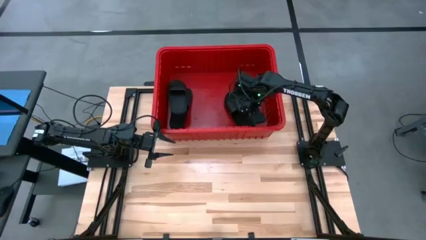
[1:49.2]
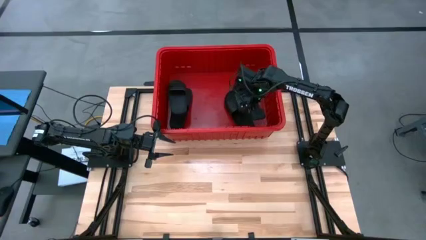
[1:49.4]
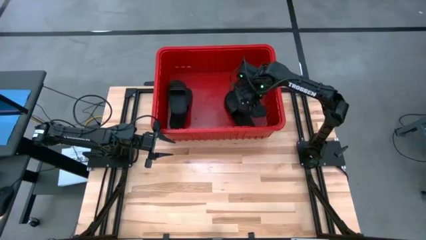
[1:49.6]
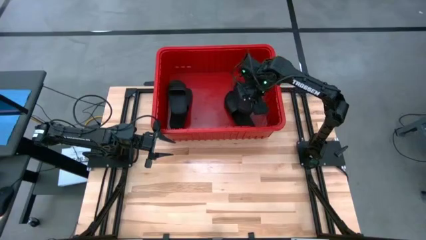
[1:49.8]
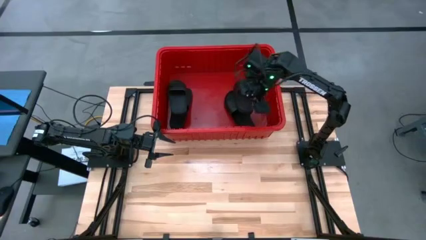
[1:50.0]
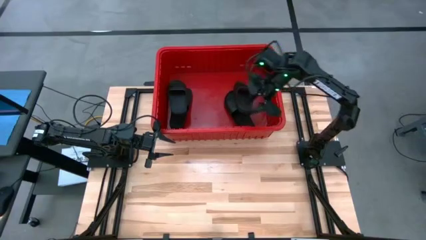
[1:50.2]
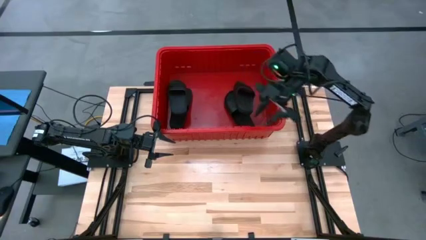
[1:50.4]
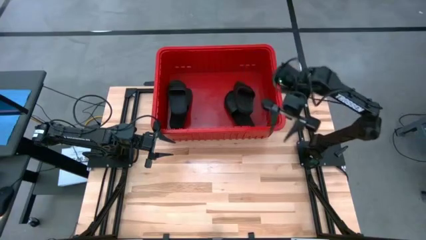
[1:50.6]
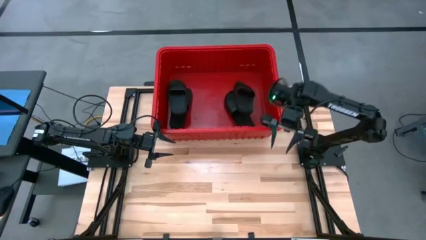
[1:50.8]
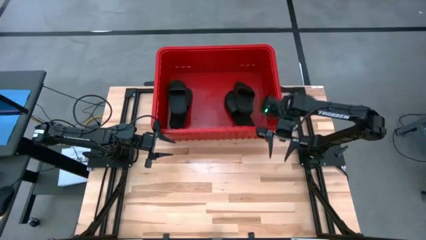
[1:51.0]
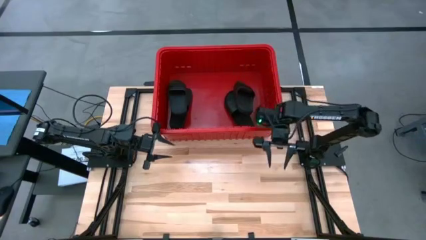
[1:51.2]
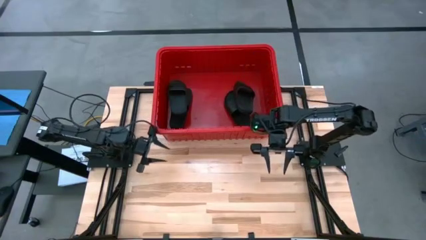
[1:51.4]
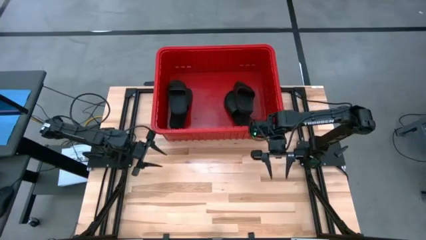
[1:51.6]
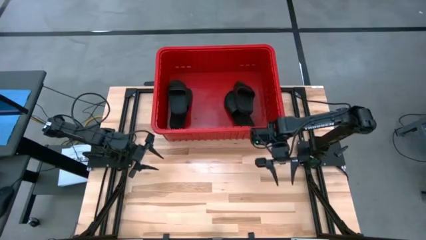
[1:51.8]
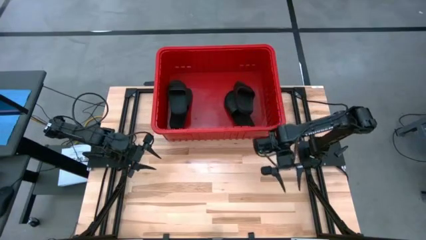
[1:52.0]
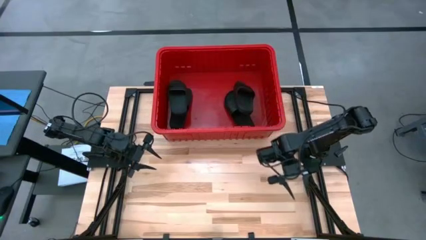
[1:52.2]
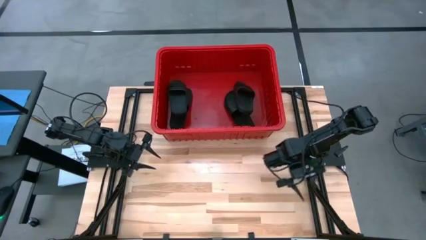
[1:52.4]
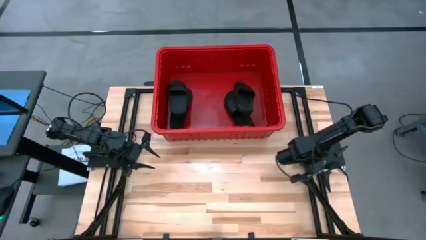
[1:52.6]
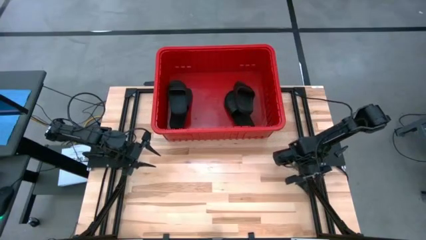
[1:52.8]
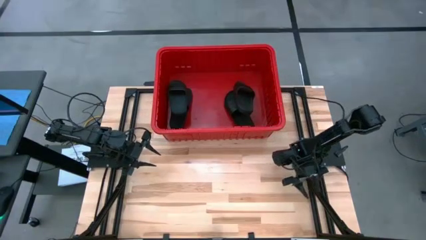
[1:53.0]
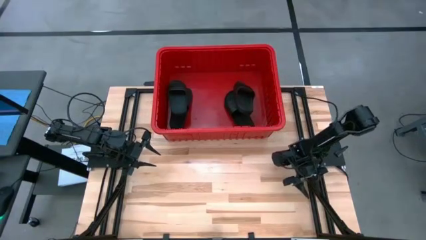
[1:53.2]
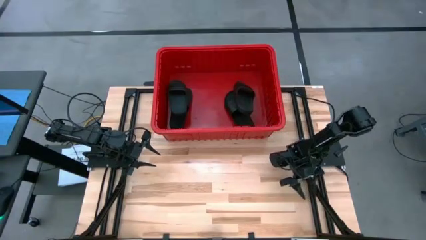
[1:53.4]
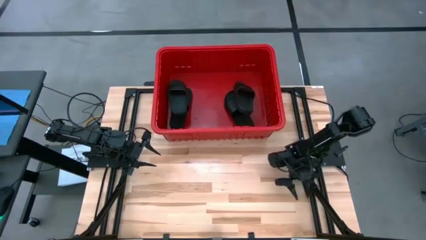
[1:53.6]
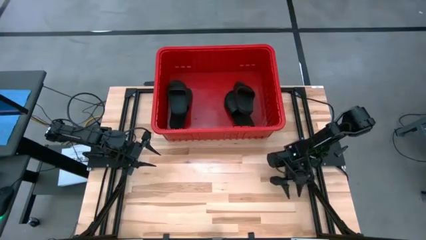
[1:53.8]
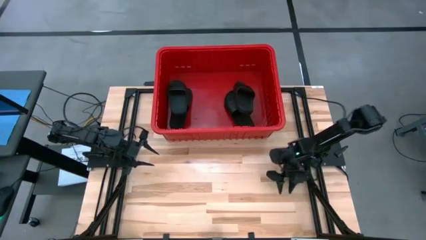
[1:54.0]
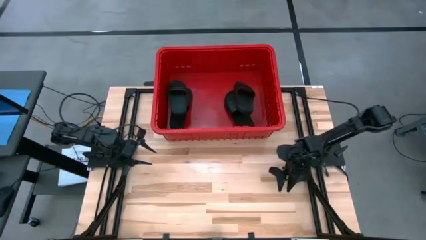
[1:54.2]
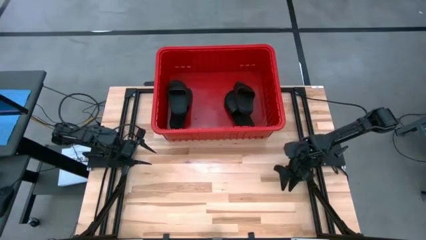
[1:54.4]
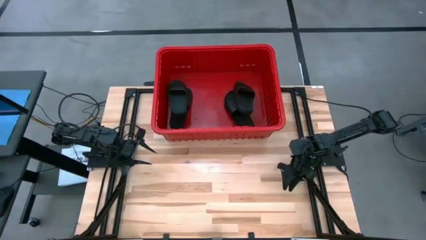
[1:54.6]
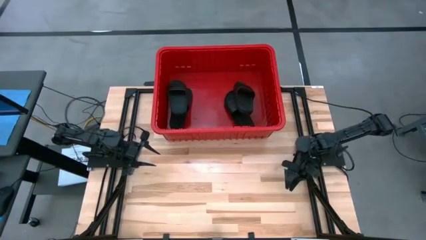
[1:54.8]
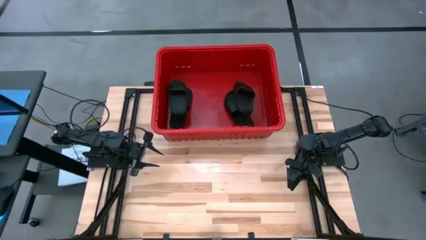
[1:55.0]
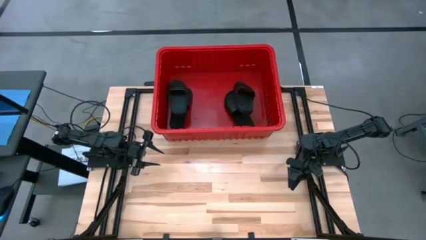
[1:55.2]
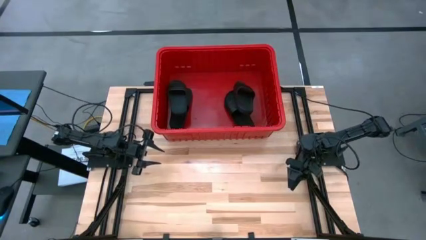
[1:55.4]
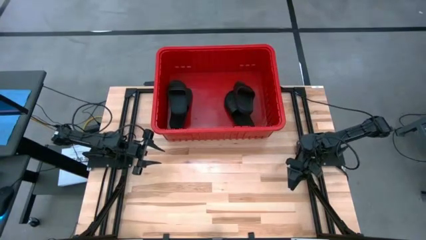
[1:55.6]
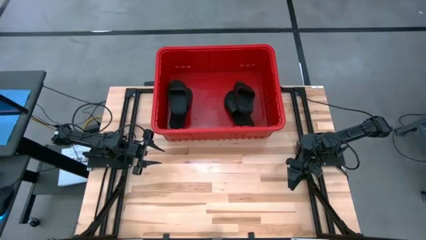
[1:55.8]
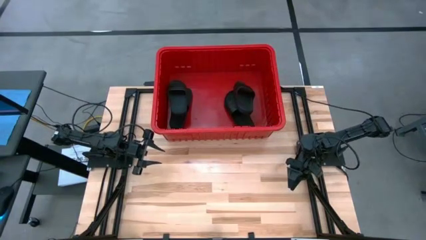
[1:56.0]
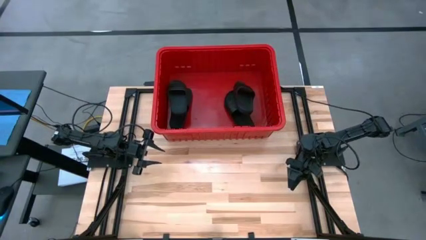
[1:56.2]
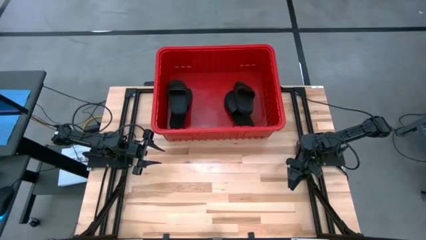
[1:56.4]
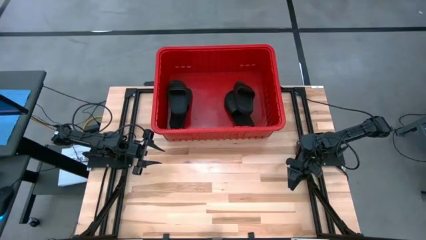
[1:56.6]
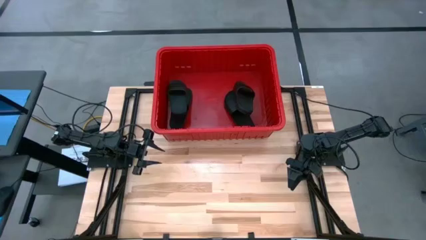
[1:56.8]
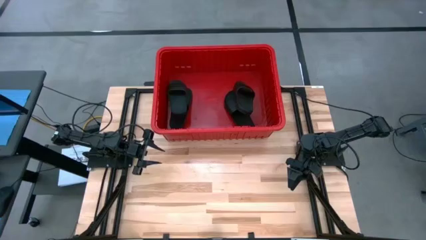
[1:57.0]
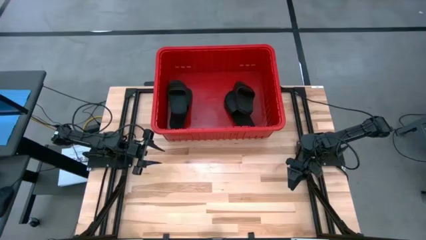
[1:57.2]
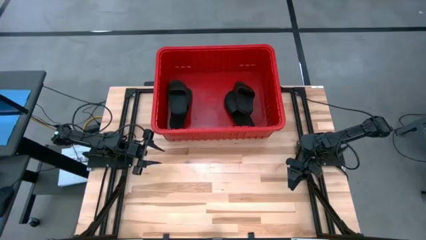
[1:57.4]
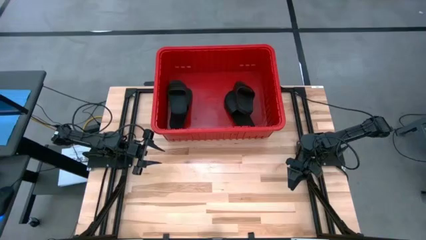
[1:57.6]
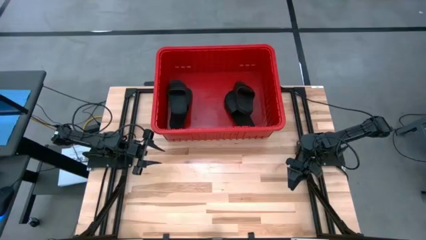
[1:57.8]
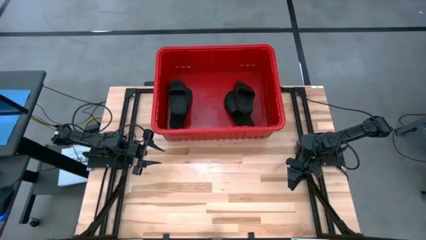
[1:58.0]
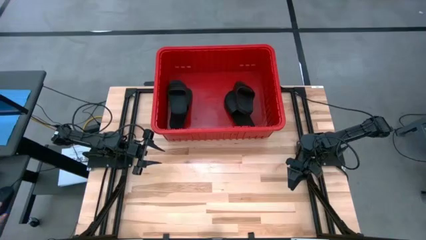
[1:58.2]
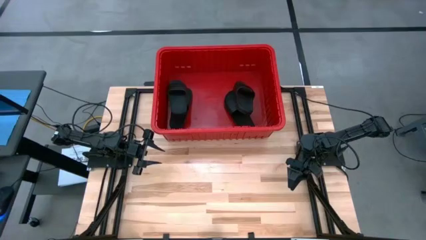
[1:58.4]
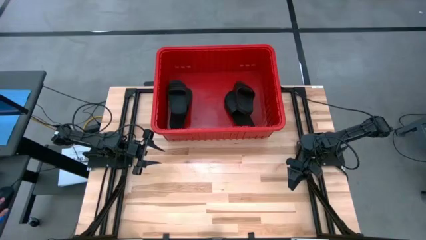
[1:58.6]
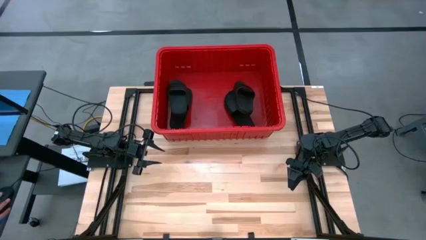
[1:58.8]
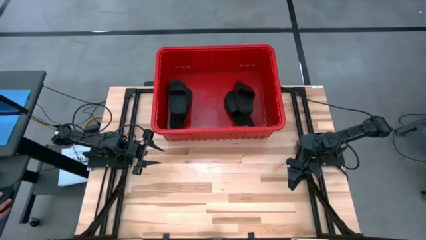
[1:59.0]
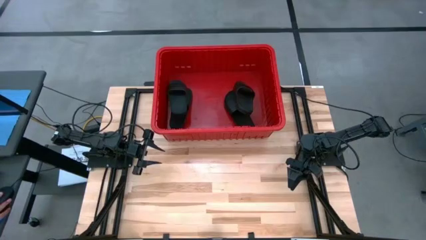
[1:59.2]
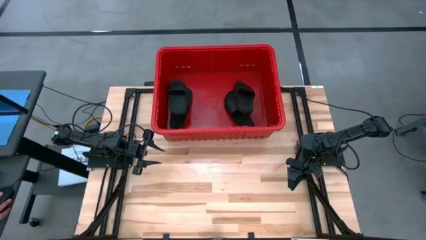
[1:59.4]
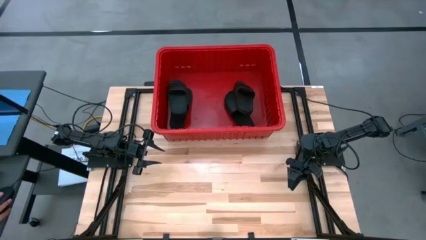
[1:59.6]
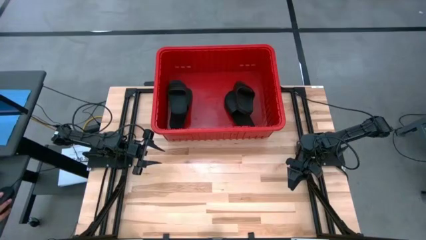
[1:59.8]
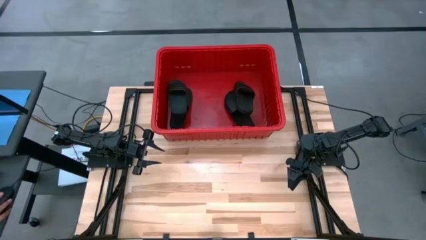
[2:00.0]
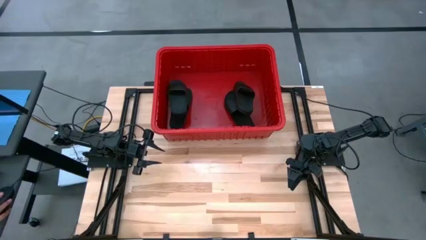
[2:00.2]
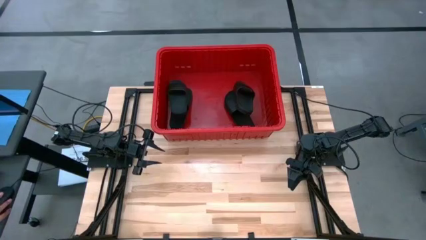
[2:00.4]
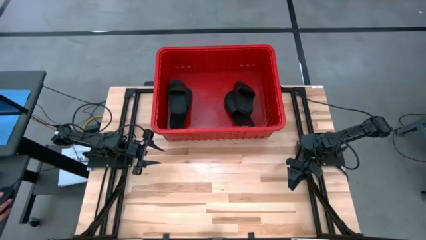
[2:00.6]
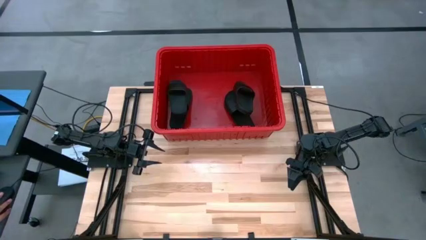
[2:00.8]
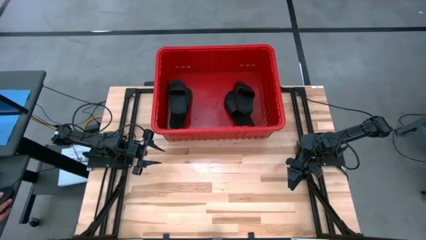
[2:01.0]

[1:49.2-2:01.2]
Task: Pick and place slides into bin
Return to Home Position

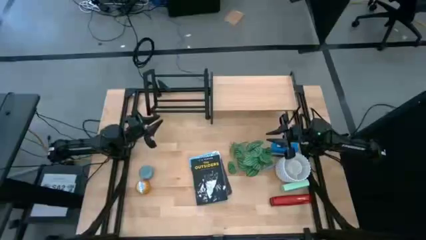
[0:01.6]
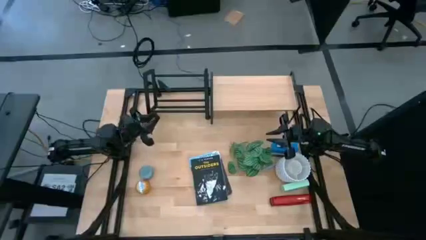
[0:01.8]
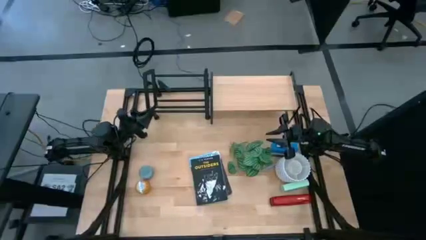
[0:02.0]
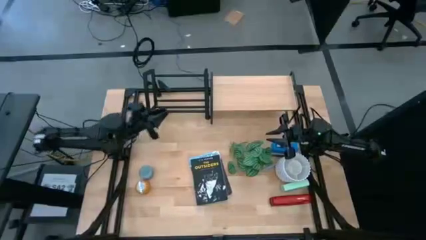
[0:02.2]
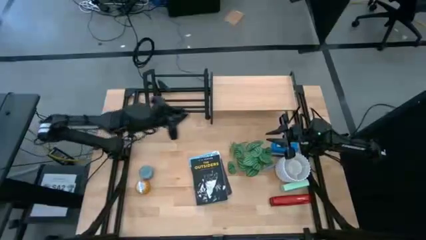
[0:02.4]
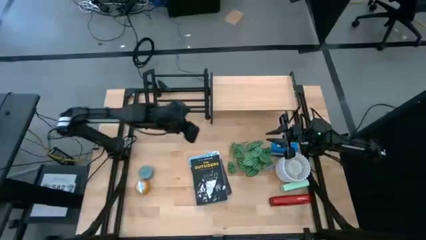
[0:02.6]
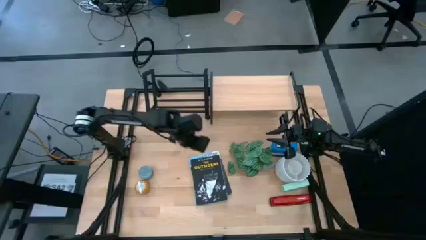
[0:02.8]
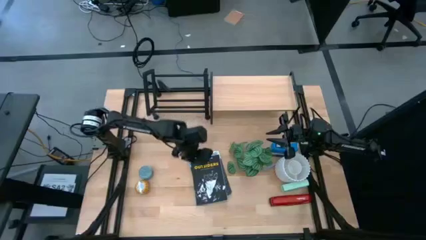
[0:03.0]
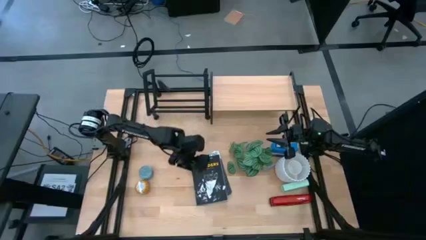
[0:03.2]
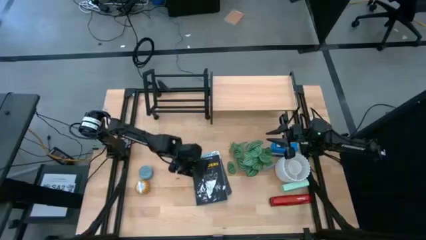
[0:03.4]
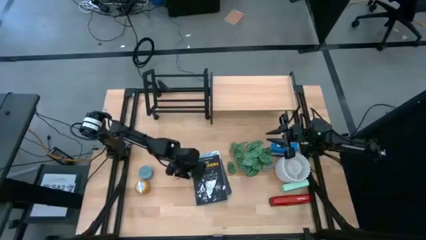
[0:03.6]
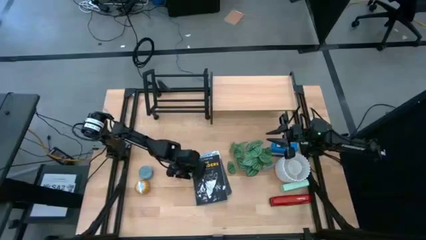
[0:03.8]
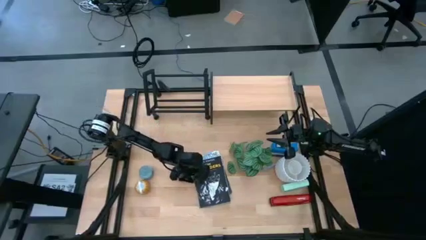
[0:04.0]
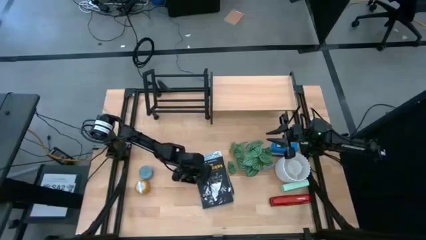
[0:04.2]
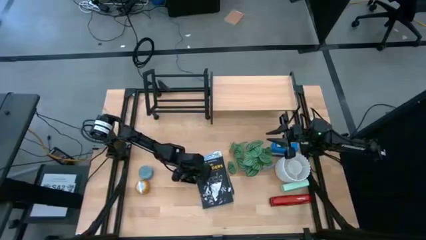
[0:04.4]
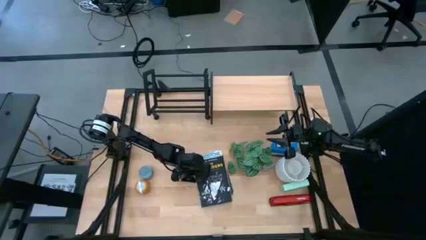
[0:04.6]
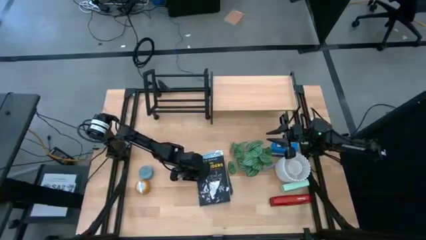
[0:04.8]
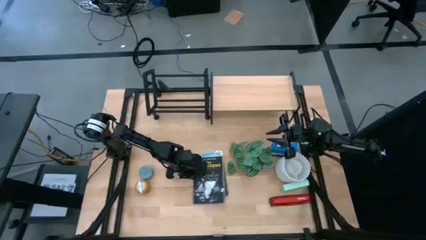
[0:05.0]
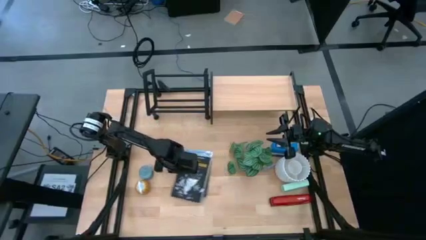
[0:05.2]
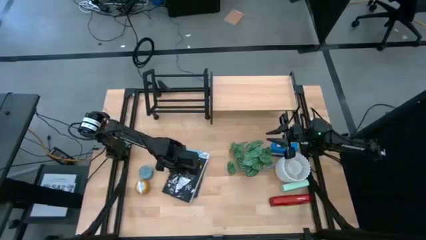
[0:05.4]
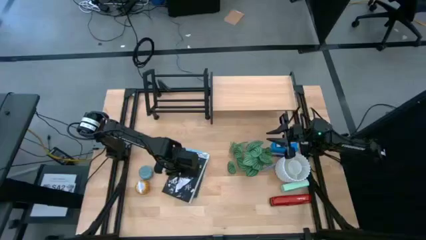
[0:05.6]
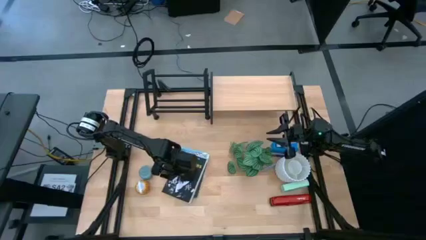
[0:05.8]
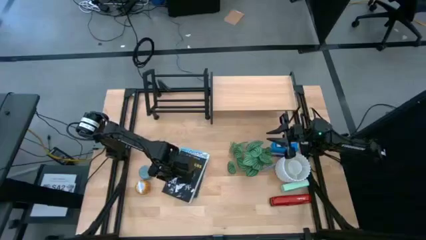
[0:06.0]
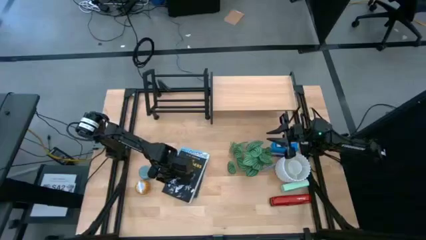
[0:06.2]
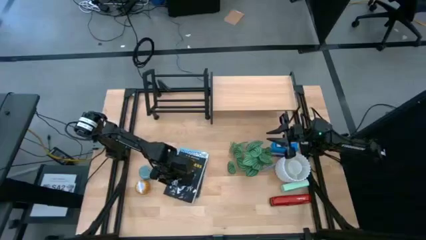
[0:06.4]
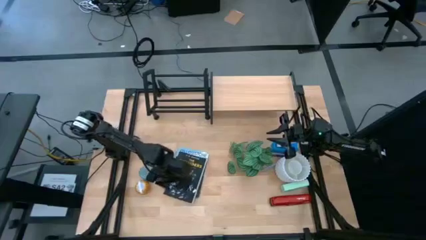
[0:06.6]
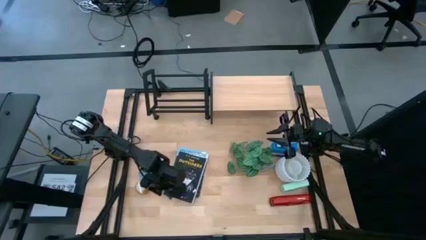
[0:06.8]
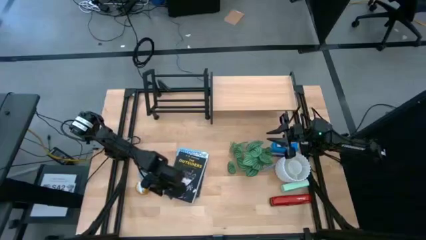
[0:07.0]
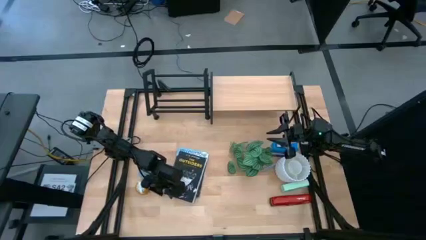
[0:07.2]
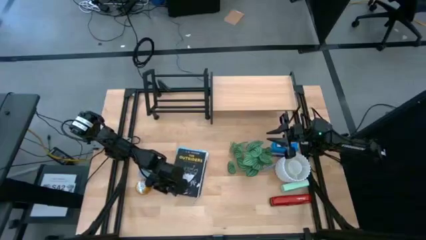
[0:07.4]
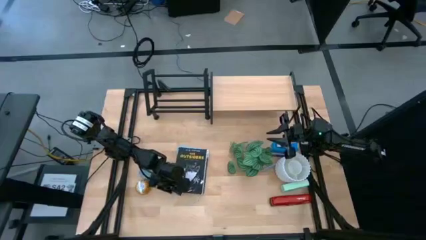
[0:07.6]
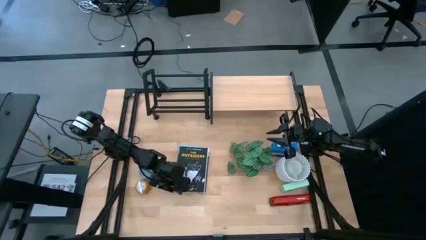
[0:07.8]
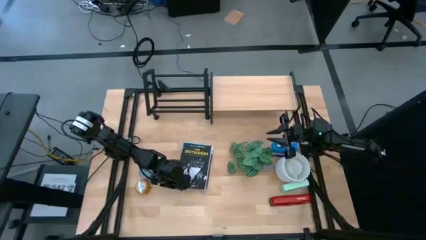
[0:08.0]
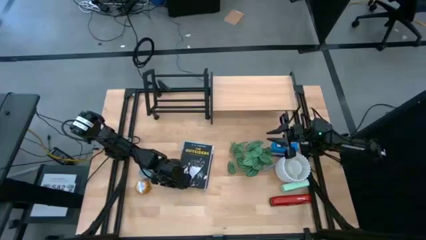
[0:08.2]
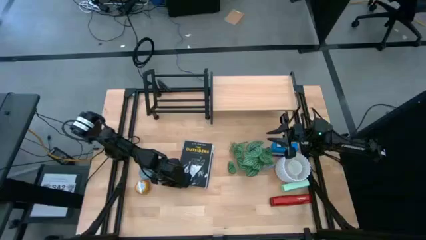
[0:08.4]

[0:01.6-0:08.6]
Task: Stock shelves
Adjust the books on the table
